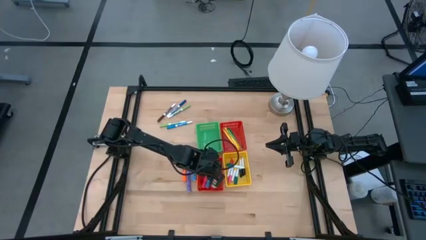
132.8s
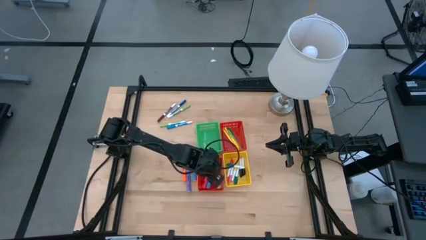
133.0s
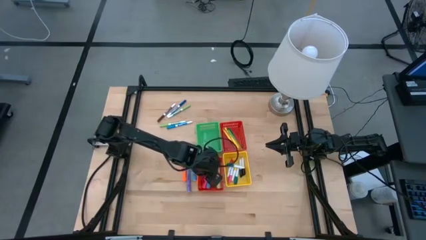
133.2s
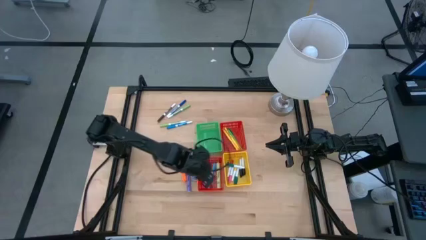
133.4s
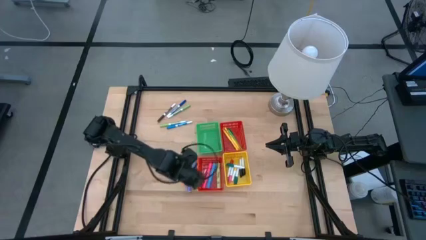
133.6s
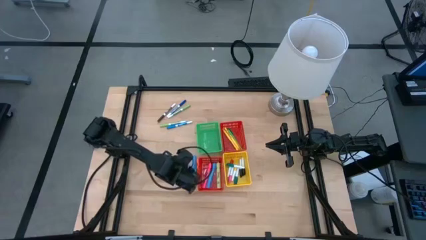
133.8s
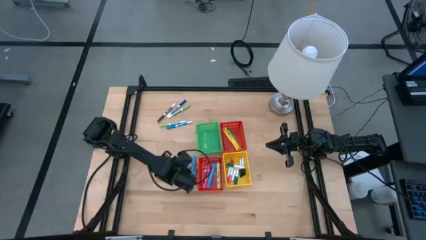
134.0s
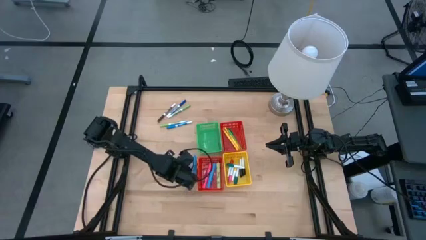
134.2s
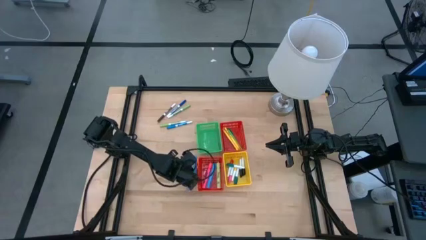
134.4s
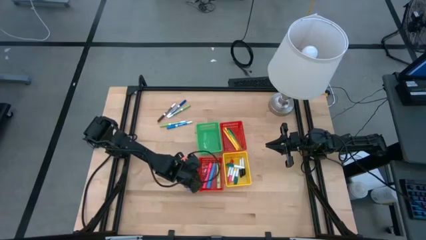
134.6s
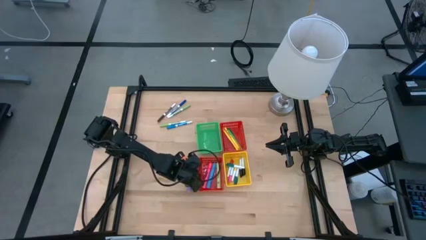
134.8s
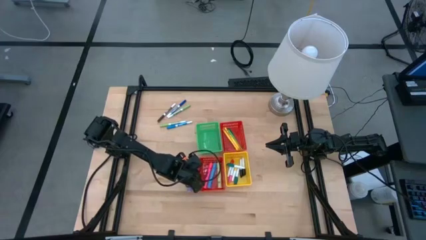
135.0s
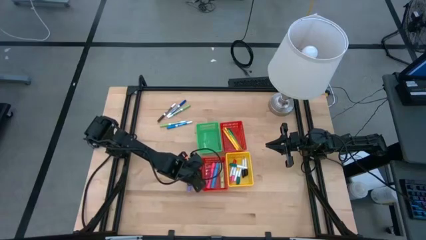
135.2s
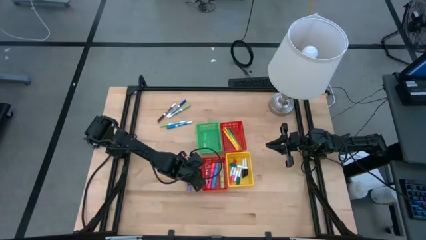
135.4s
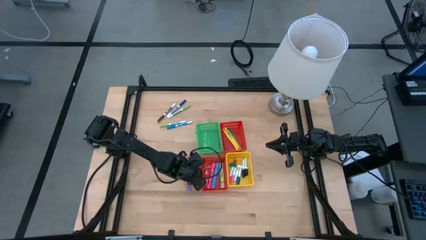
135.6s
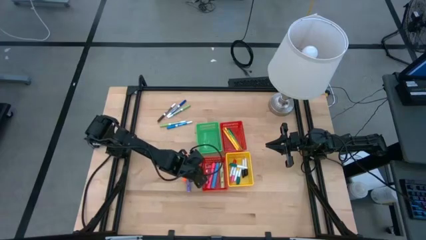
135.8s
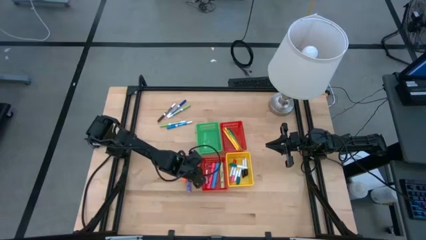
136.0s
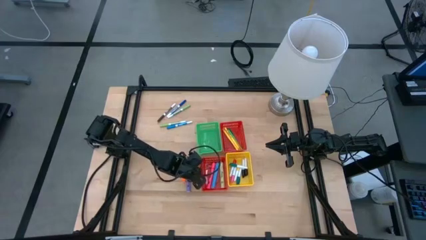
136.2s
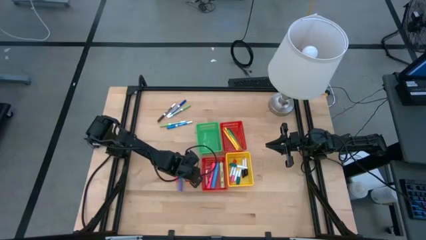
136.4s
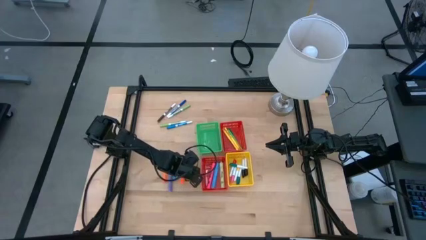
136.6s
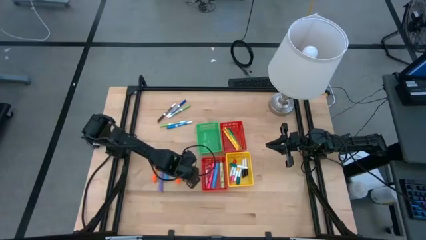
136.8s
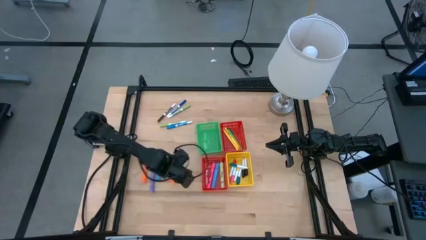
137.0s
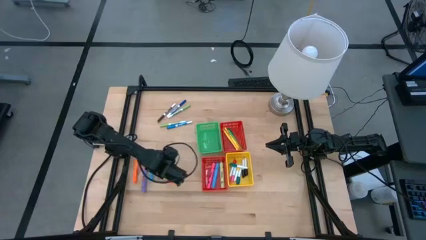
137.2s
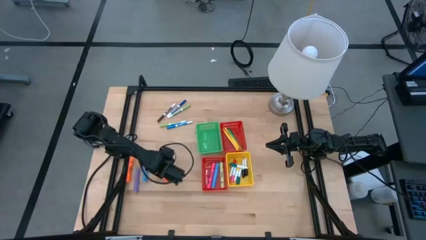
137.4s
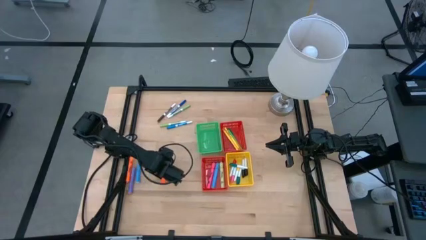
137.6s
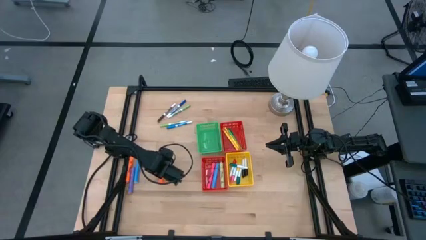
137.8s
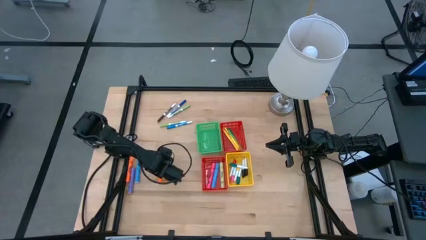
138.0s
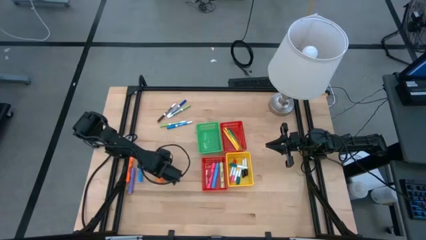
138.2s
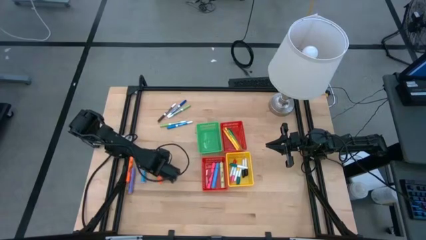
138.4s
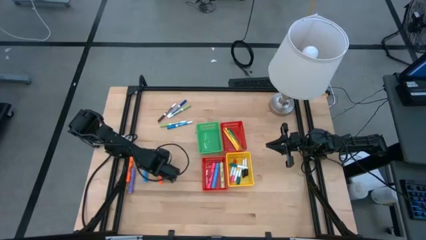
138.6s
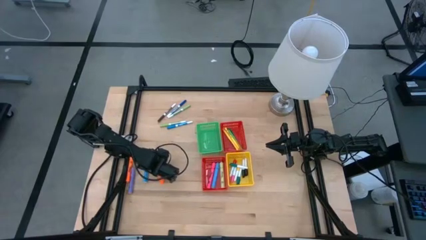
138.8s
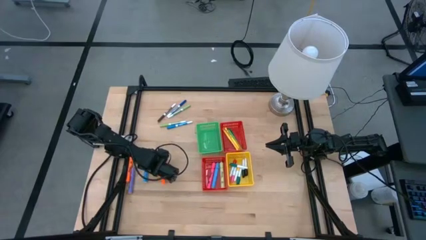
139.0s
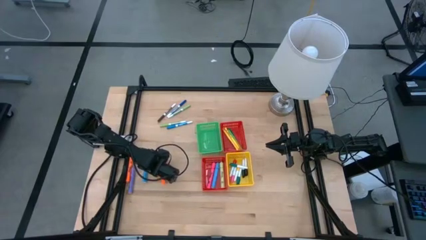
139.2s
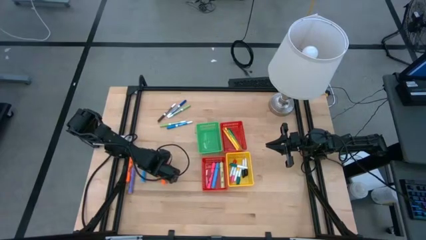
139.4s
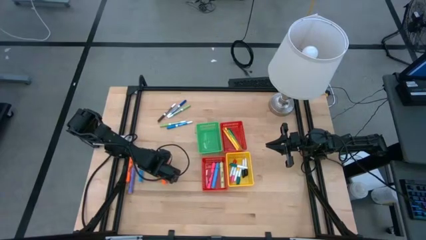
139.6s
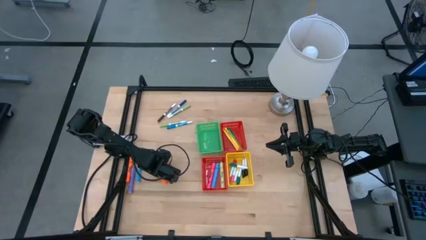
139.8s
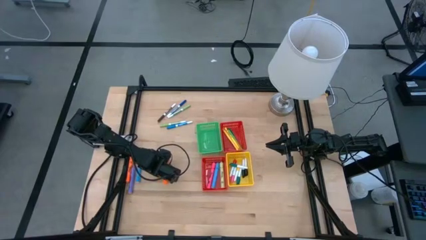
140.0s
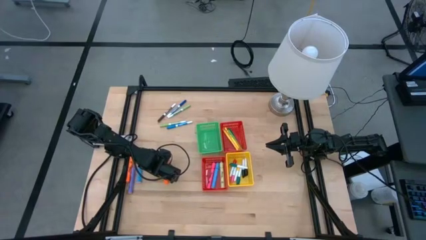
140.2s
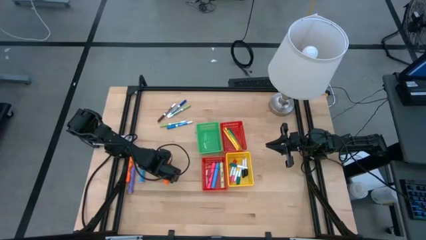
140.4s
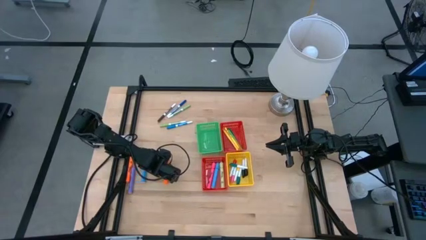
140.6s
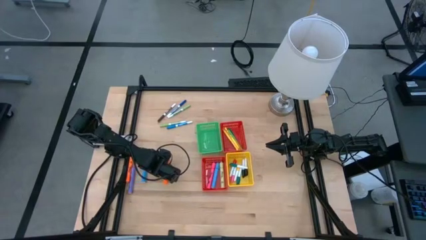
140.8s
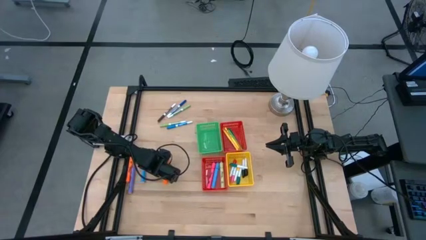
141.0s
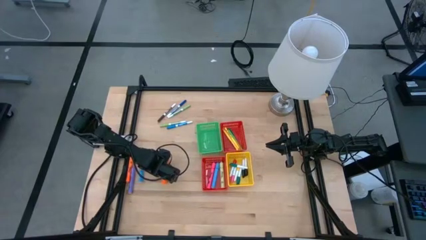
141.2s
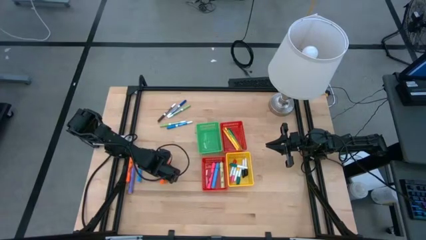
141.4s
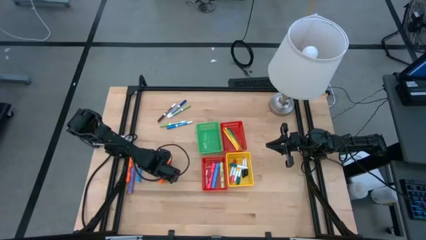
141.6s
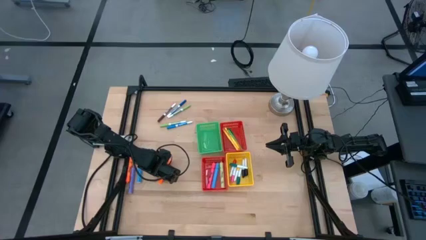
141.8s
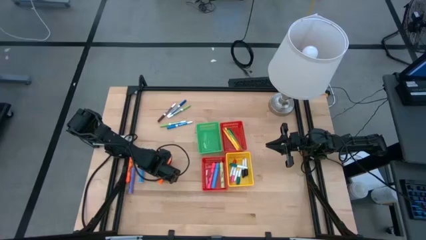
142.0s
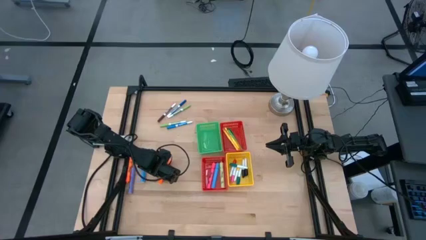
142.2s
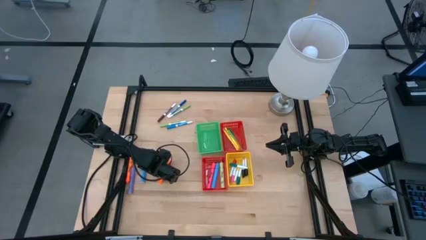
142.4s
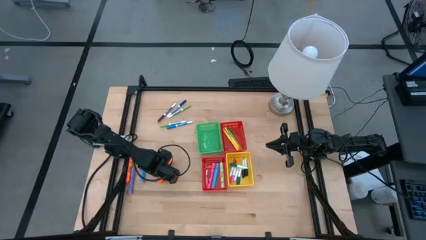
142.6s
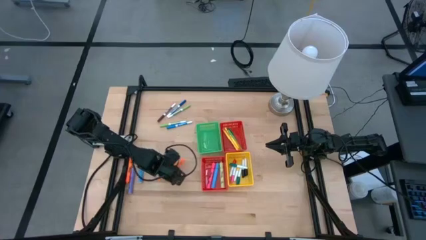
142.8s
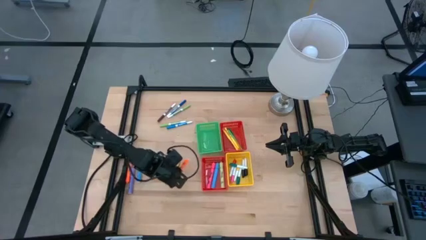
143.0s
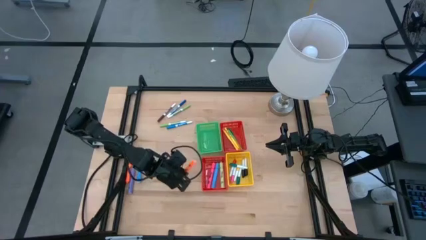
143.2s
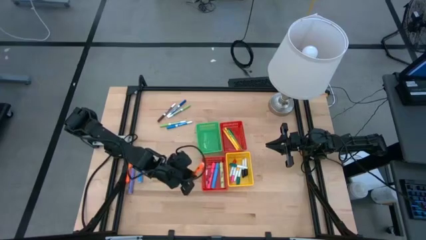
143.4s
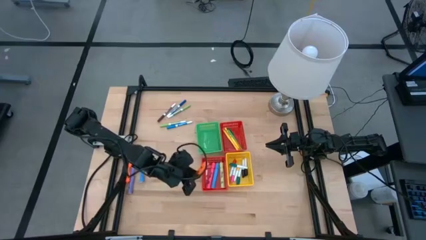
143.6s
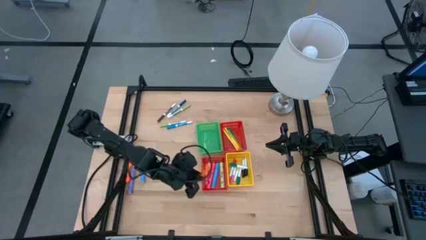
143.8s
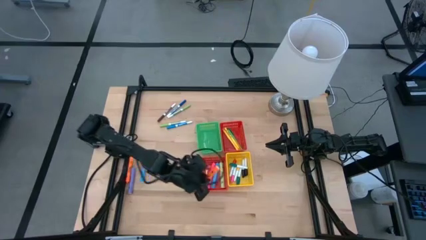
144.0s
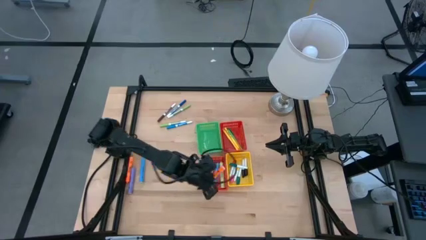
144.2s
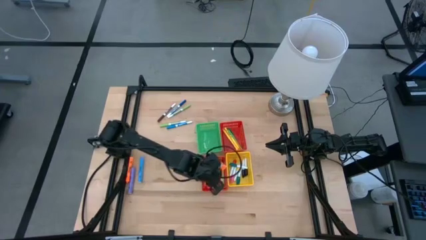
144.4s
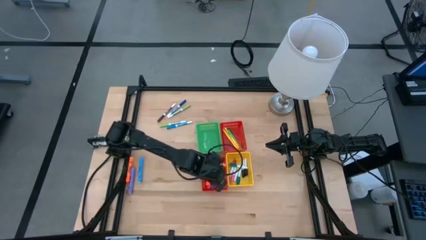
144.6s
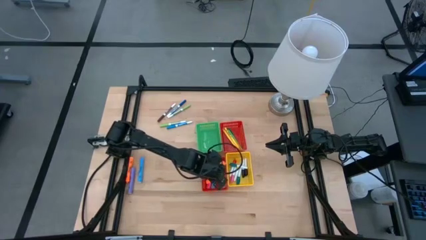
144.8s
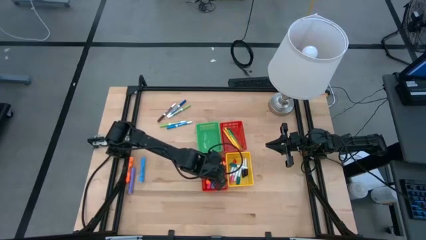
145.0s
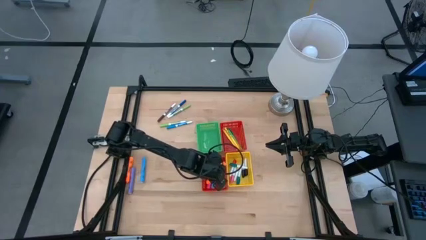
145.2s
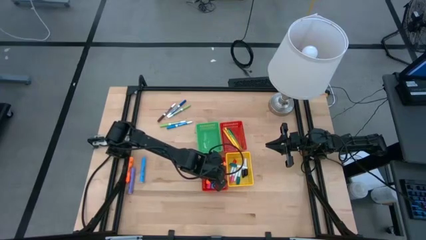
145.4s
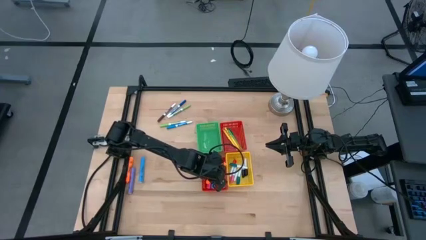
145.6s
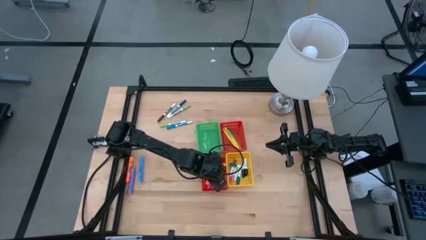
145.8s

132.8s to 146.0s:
Task: Pick & Place Markers
Put the large orange highlighter into the bottom red bin
